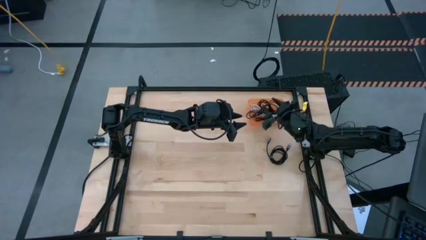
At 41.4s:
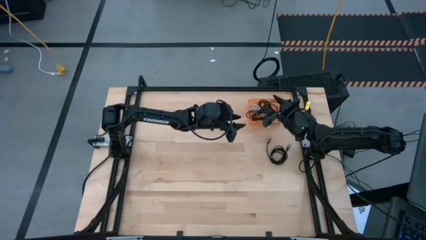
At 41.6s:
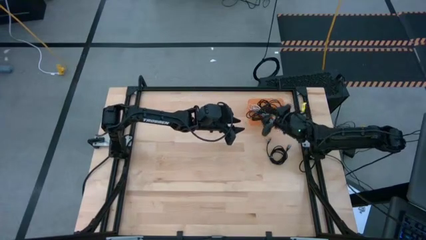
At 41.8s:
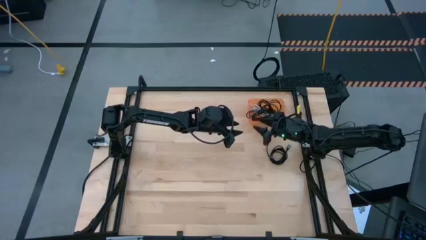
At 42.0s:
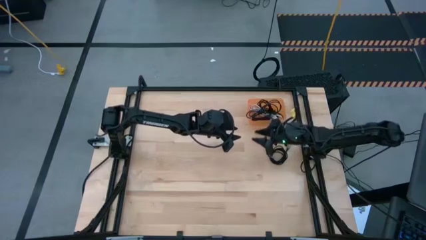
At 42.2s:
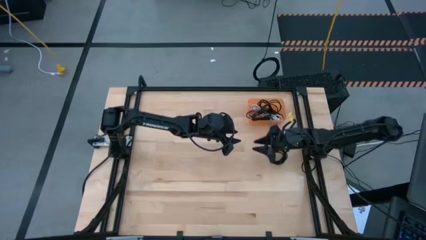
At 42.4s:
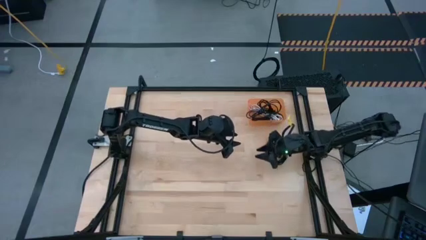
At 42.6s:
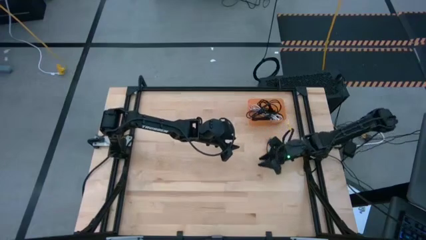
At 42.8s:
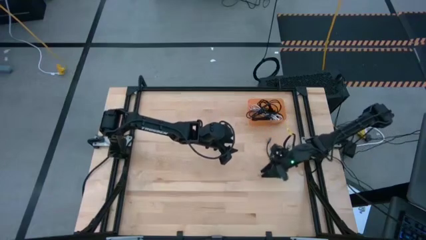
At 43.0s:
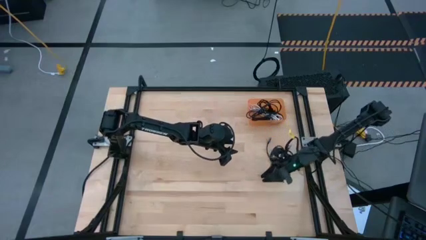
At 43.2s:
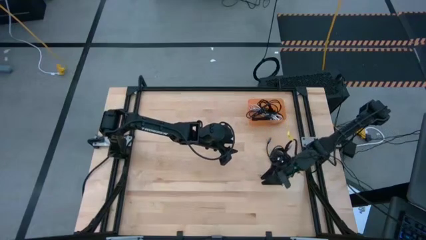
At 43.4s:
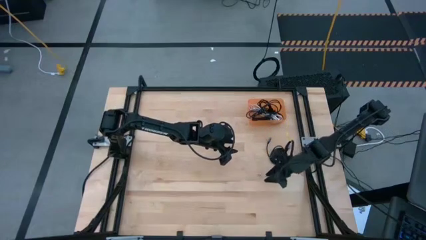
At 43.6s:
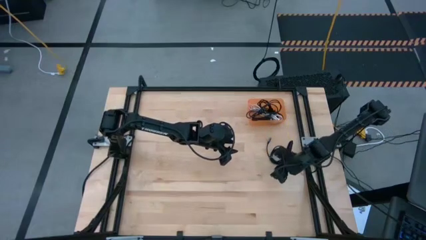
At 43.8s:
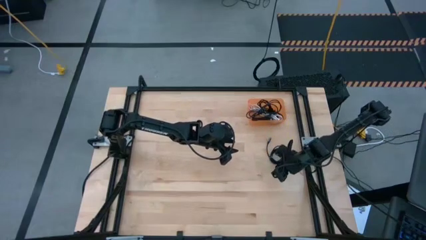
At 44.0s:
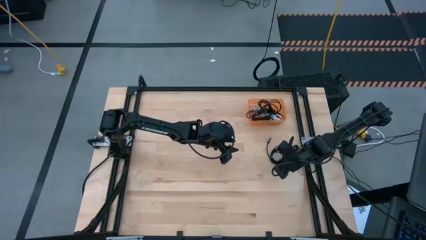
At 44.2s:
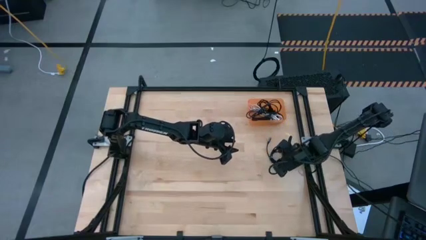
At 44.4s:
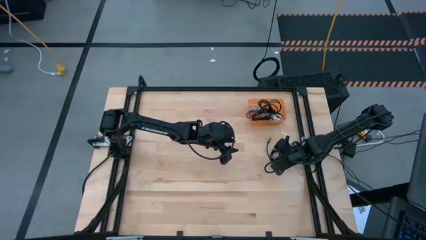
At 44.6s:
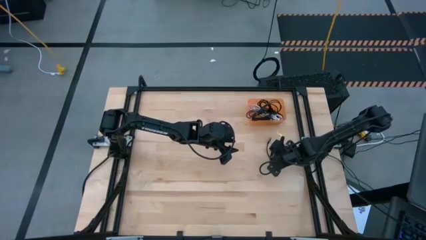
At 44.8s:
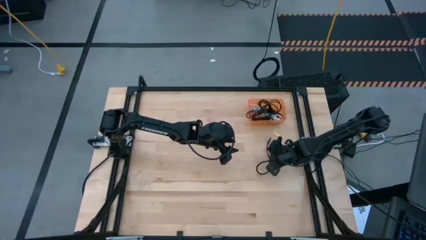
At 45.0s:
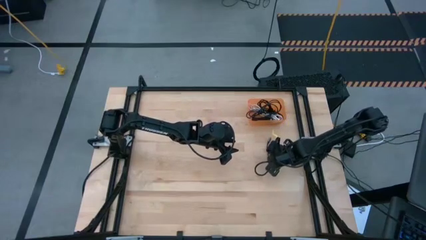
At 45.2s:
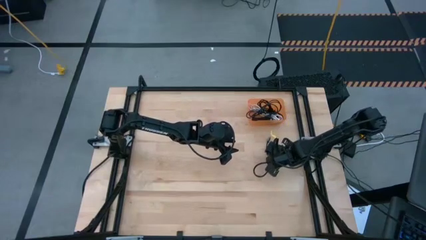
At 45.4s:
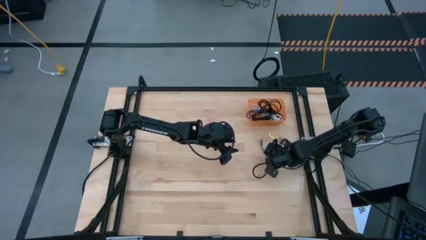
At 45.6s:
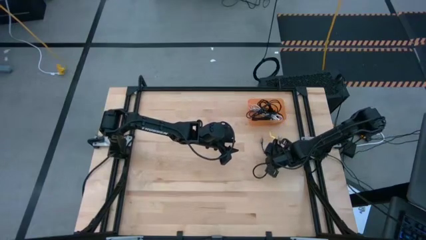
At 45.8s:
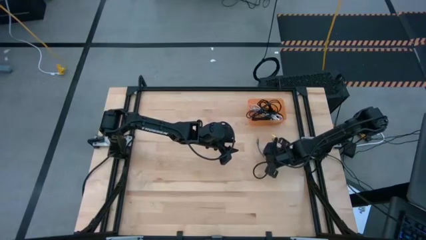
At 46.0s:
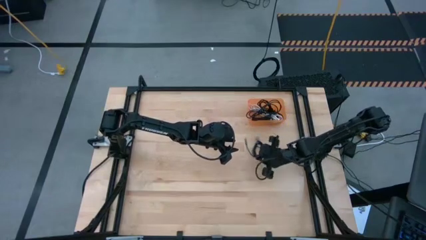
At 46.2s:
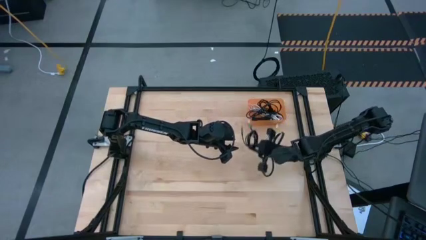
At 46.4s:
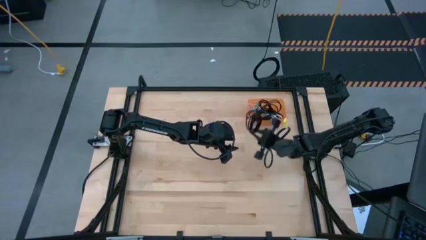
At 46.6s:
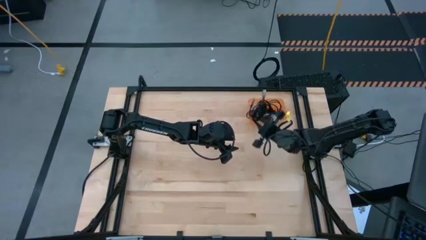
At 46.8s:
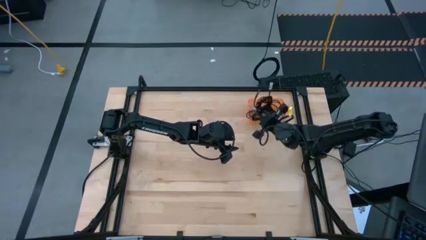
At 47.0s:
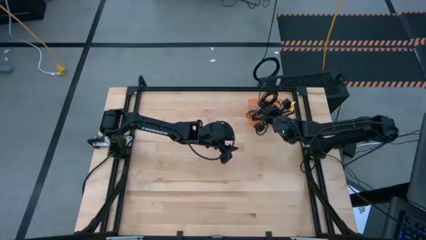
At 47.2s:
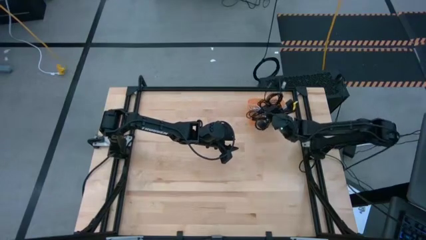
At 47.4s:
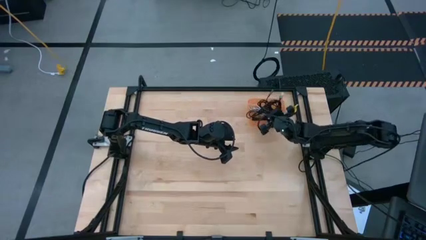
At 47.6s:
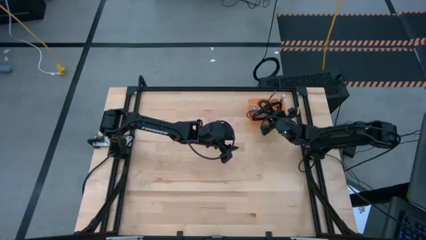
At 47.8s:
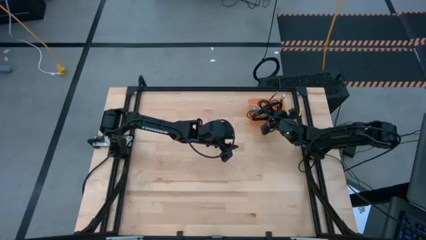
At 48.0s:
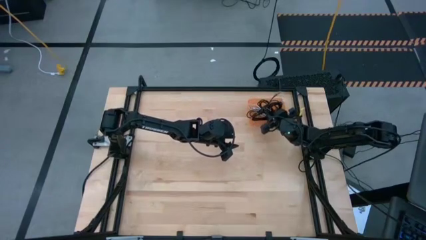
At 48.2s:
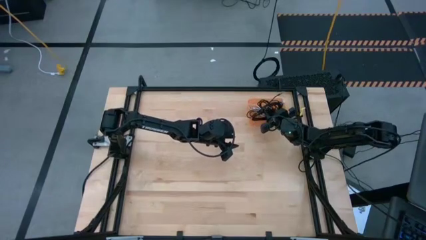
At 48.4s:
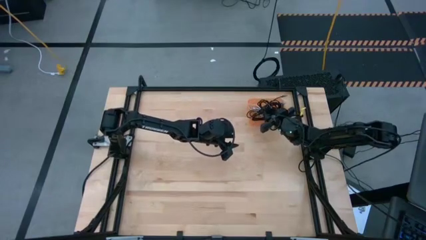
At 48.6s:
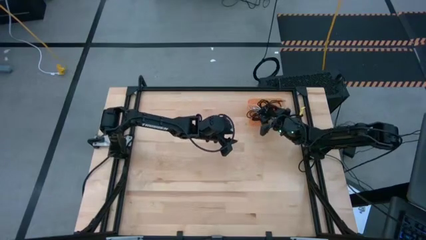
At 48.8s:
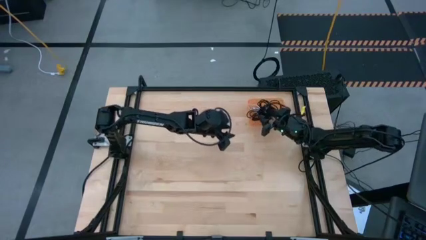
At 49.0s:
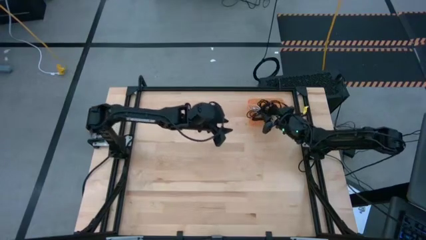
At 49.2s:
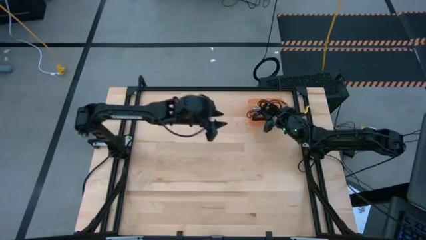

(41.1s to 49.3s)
Task: Pick and place USB-C Cables
Put the black charger cable into the orange bin

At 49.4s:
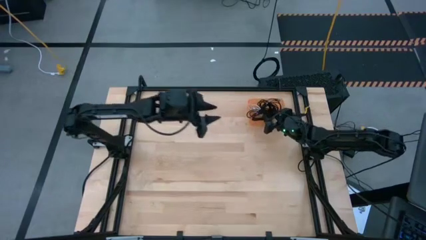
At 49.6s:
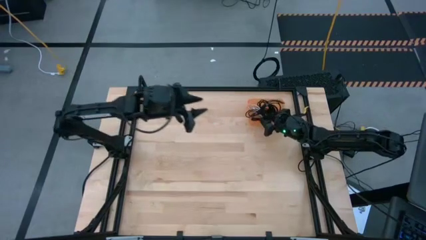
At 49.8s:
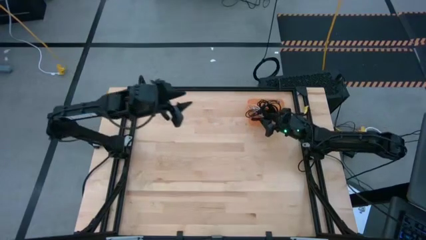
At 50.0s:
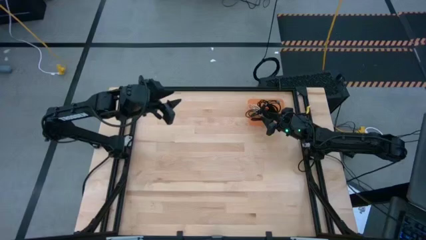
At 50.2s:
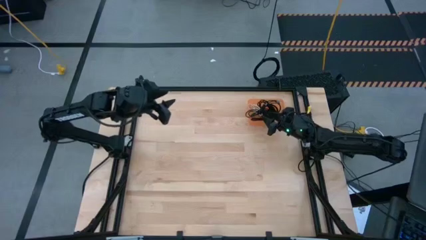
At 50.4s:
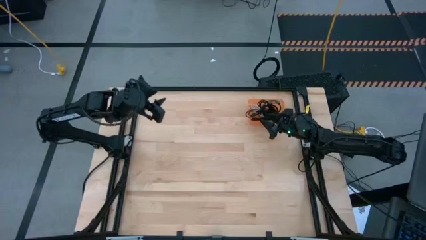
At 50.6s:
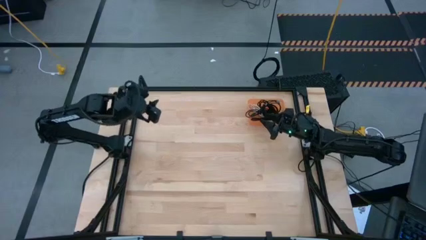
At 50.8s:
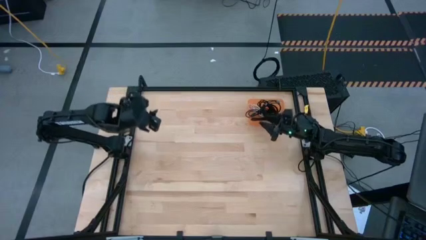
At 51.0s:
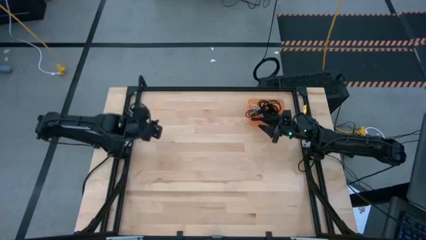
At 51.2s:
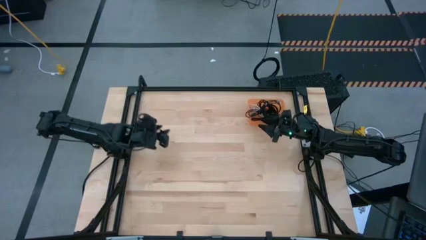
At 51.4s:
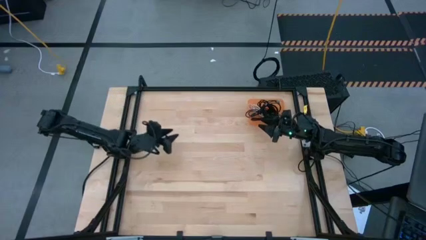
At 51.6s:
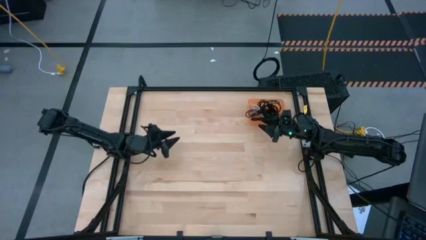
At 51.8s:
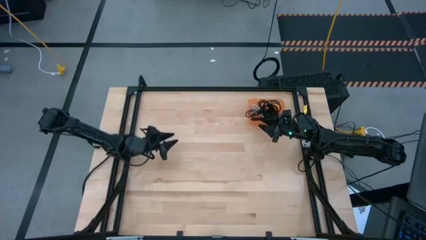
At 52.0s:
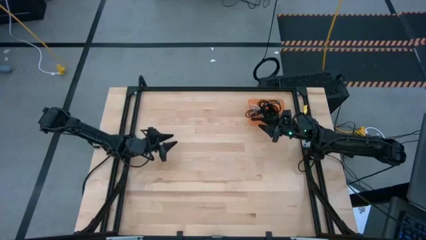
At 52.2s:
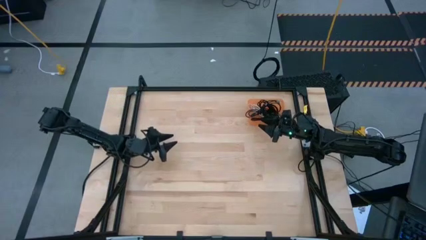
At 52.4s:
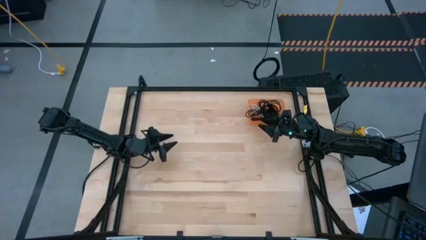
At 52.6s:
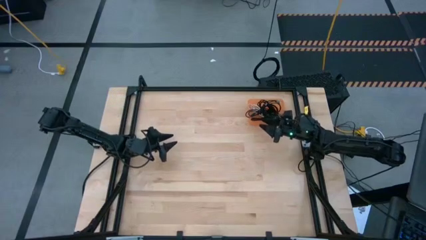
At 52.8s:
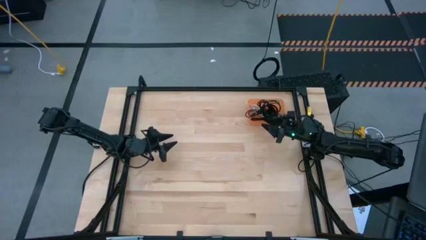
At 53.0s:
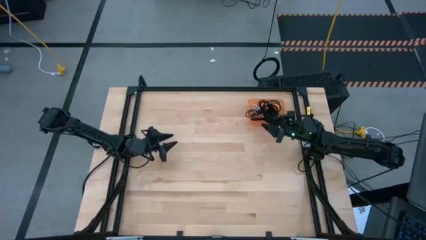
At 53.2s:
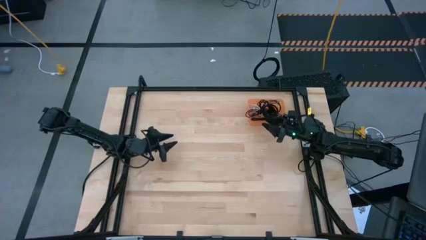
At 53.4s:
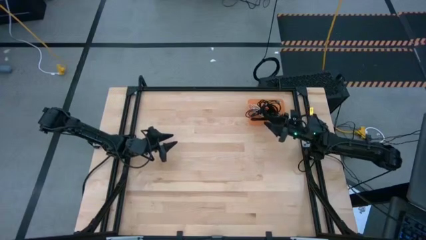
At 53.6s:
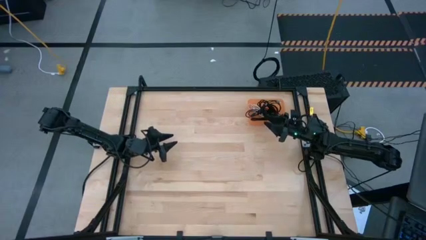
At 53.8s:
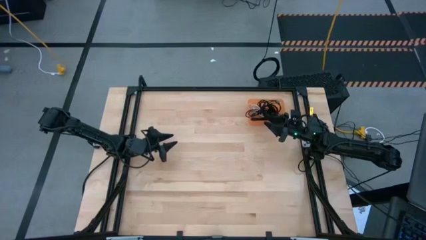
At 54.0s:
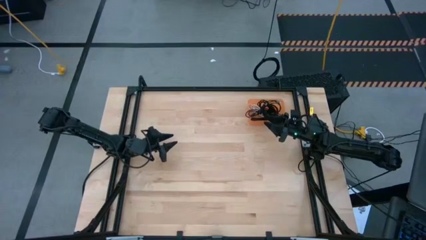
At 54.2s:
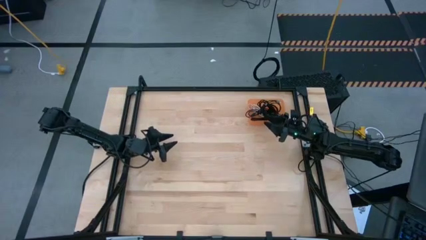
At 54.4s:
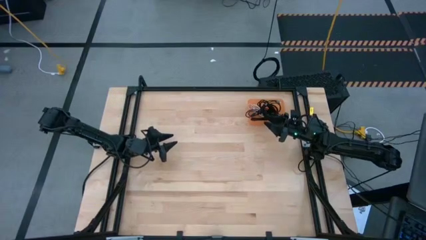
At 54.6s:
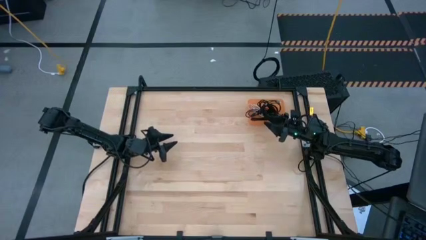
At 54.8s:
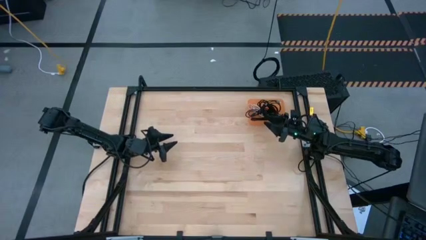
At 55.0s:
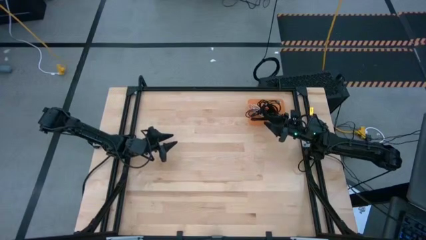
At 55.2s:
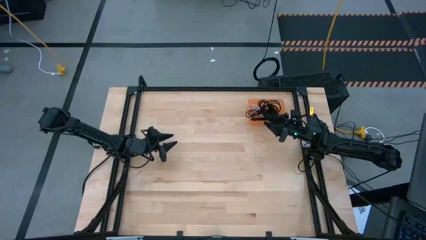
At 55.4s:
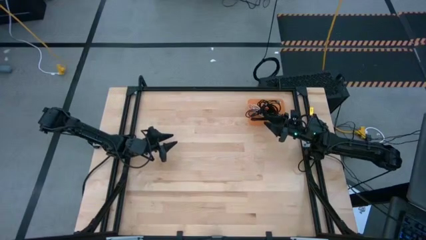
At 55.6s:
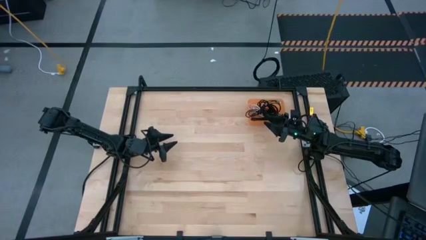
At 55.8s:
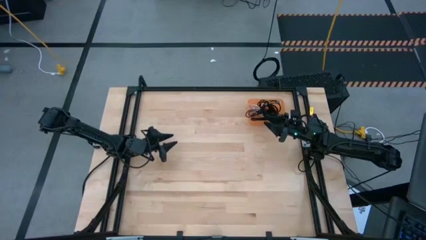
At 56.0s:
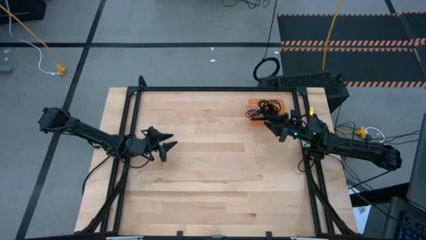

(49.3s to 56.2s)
Return to Home Position
